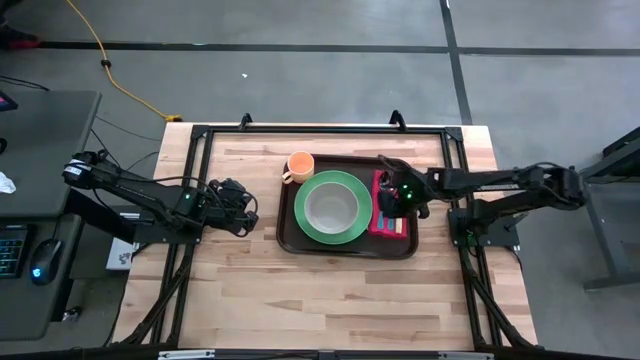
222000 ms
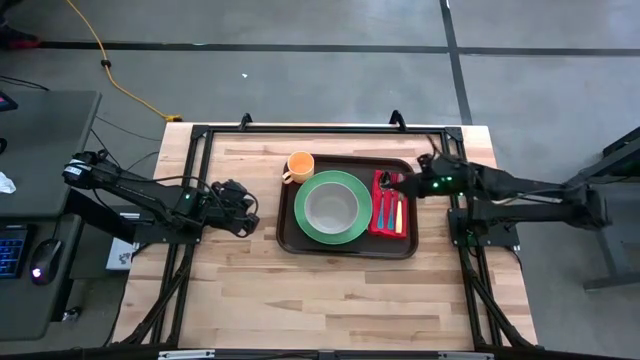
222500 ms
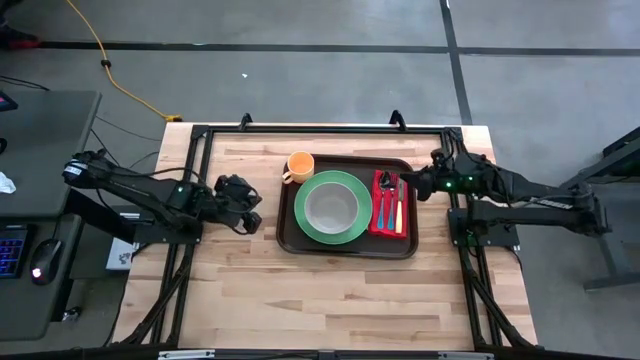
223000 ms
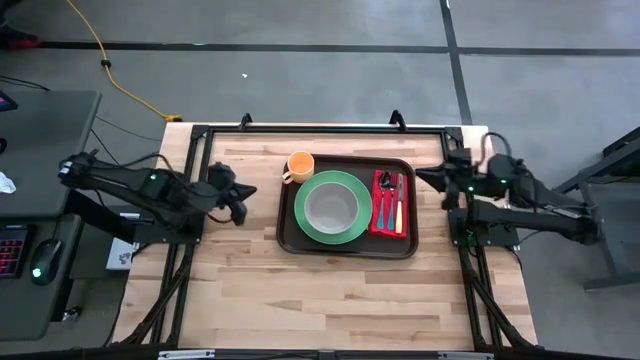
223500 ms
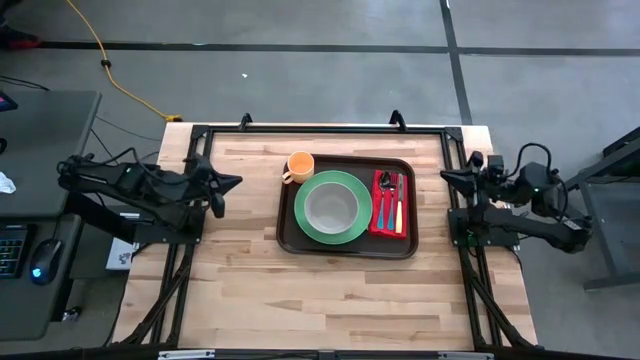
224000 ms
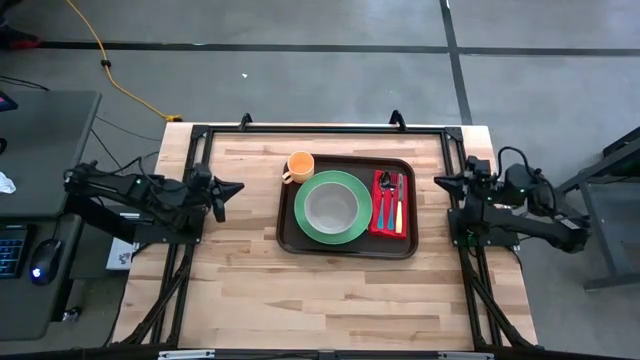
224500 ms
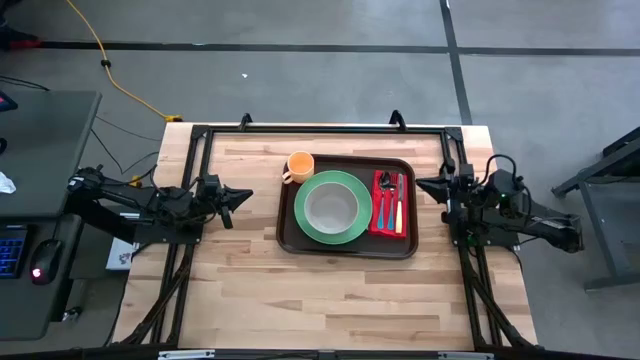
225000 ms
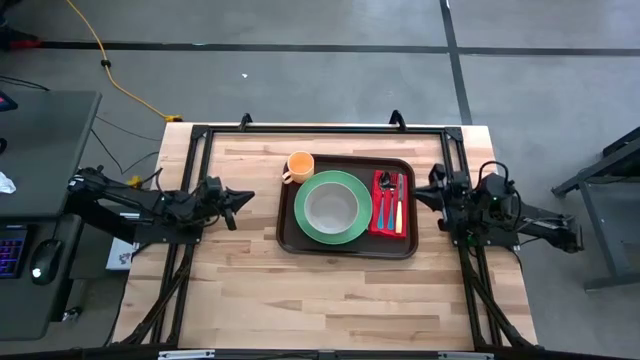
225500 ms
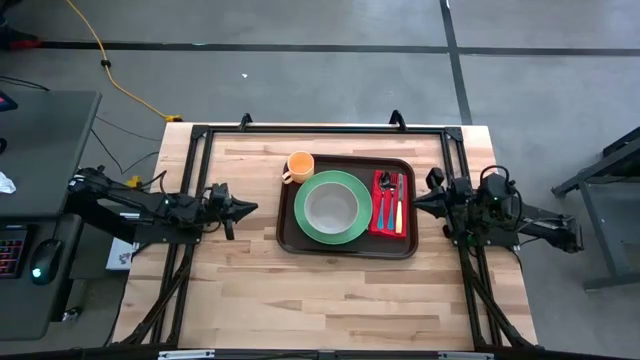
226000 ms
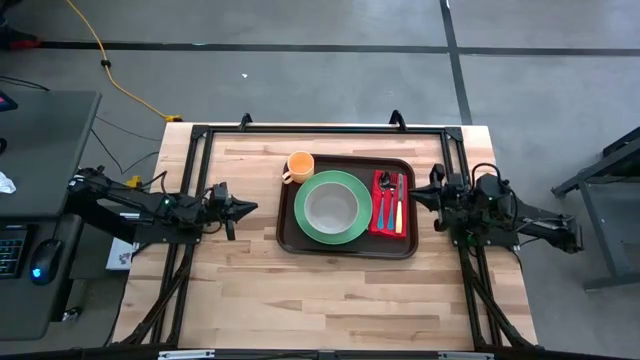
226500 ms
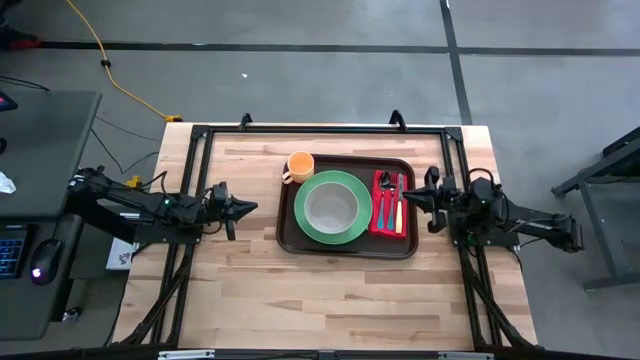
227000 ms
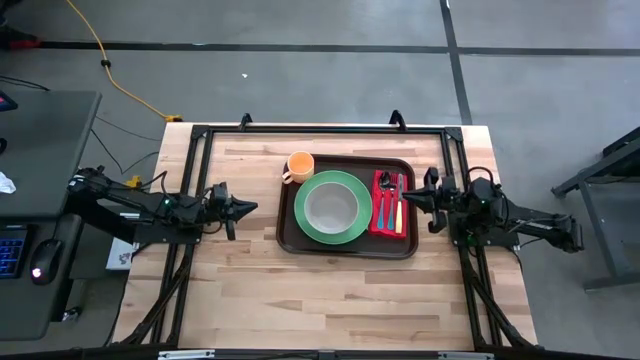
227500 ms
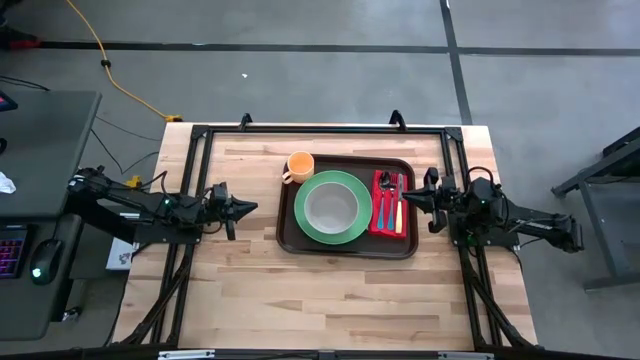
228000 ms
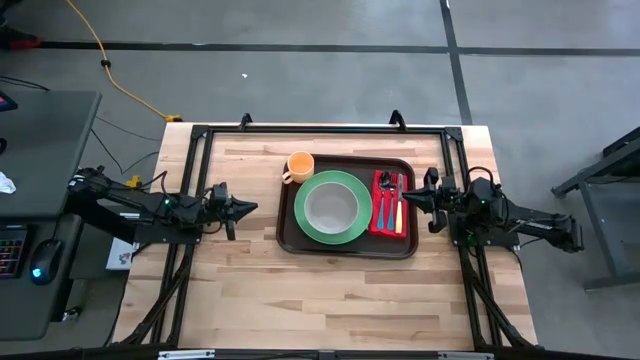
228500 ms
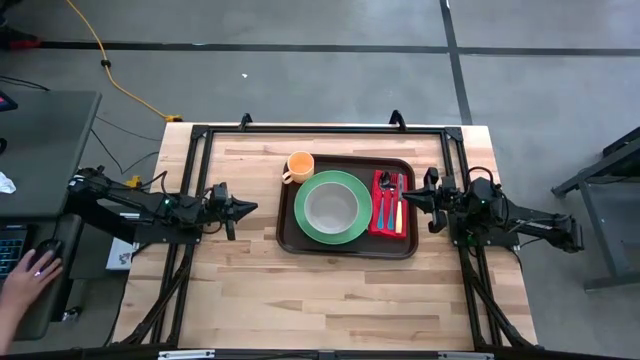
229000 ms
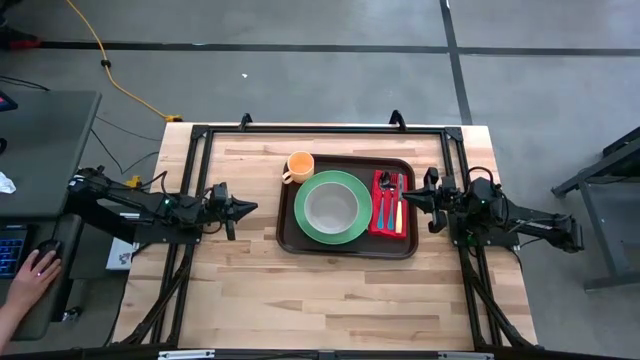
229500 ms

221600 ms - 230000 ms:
Task: Set up tray
Return to Home Position

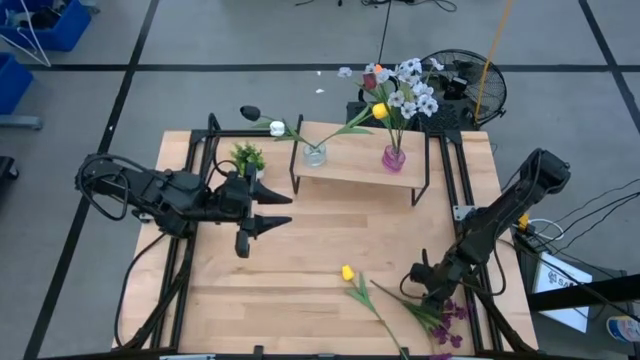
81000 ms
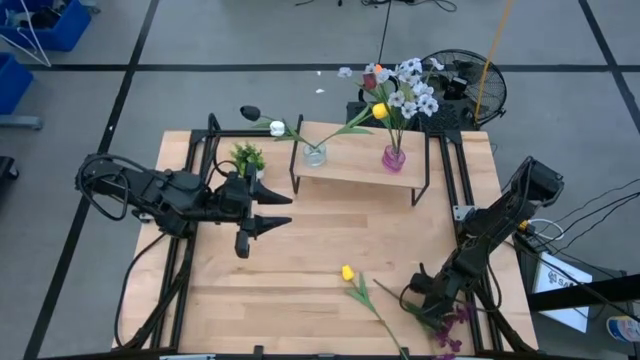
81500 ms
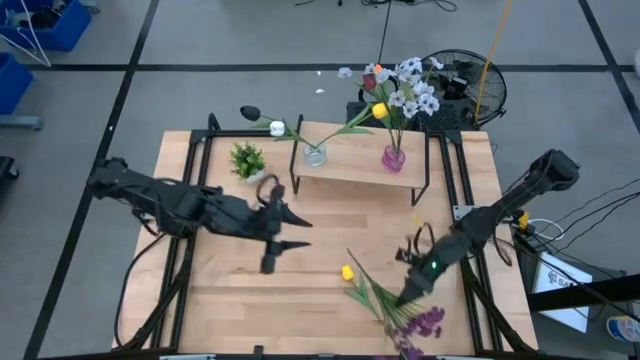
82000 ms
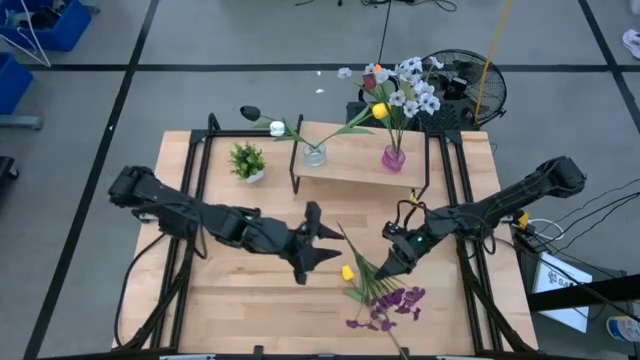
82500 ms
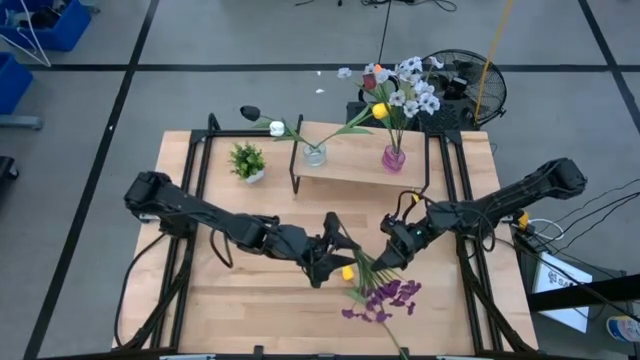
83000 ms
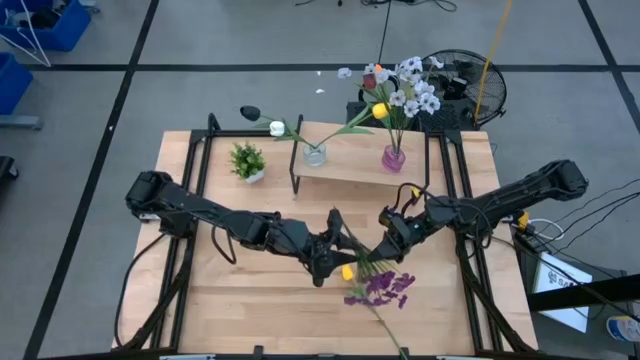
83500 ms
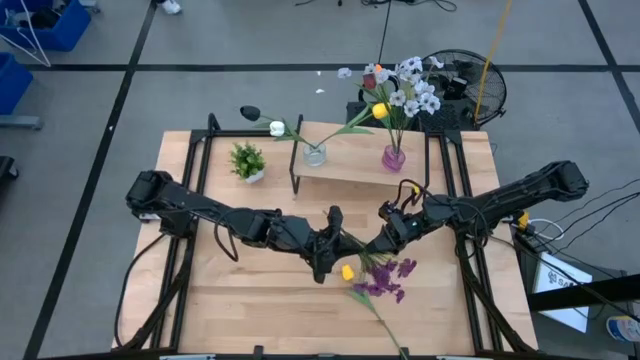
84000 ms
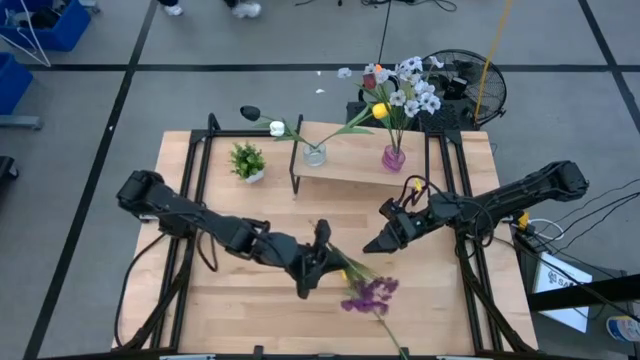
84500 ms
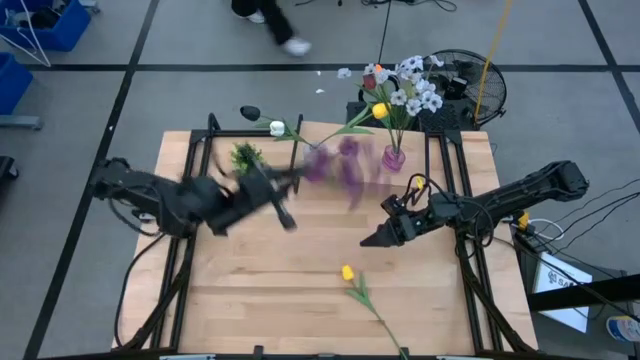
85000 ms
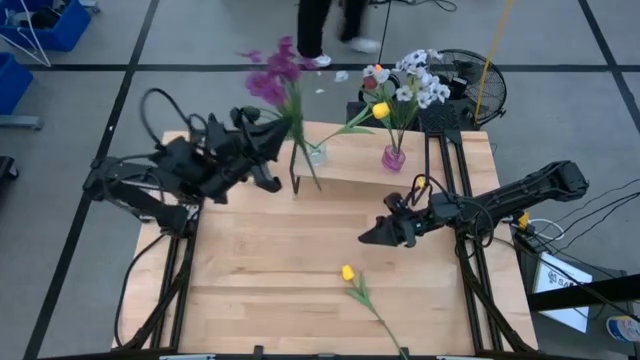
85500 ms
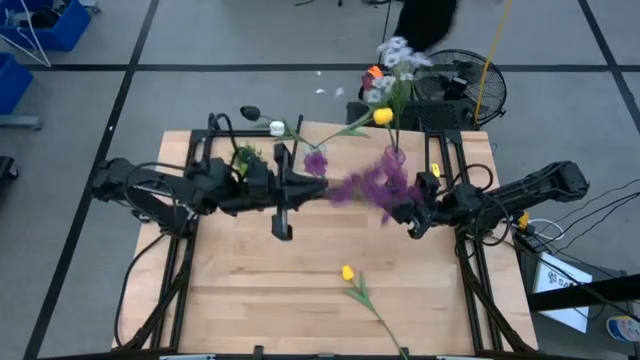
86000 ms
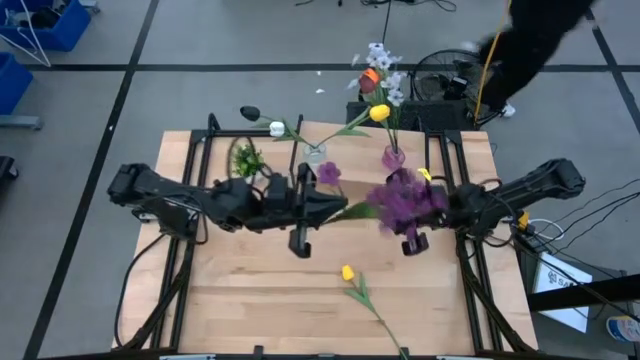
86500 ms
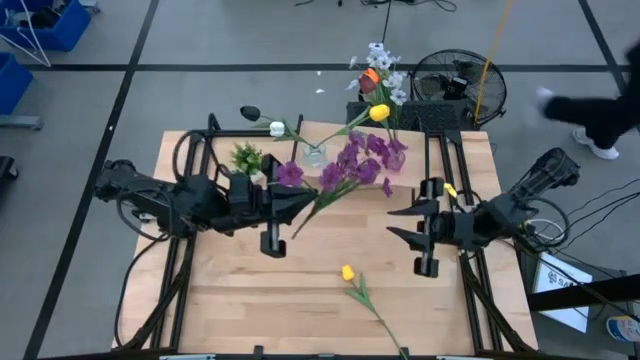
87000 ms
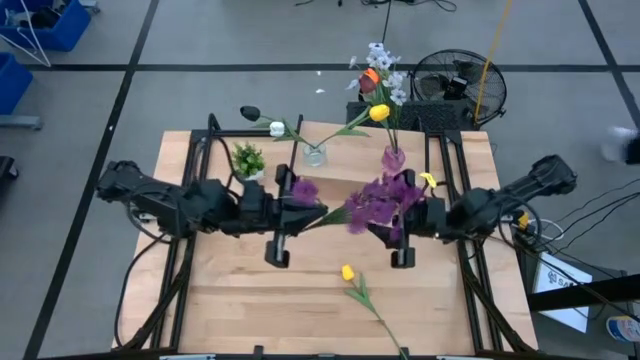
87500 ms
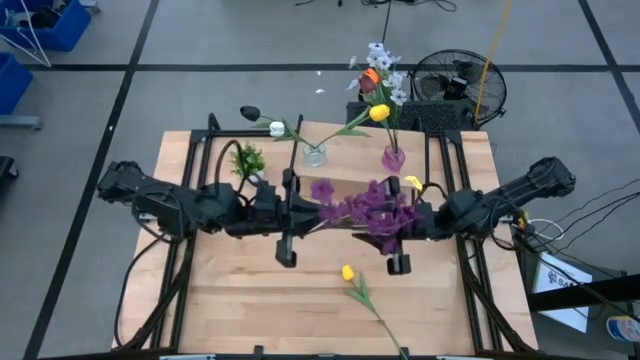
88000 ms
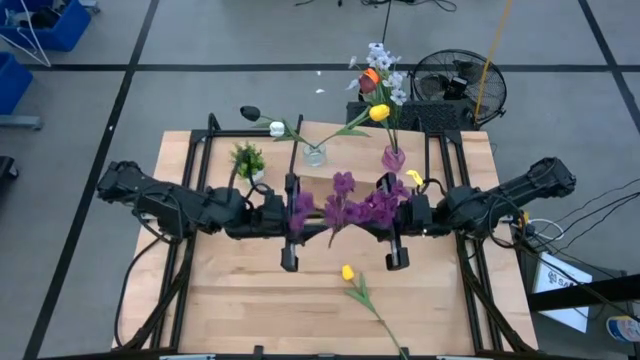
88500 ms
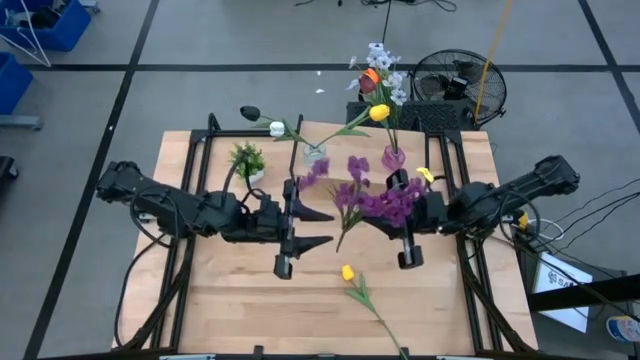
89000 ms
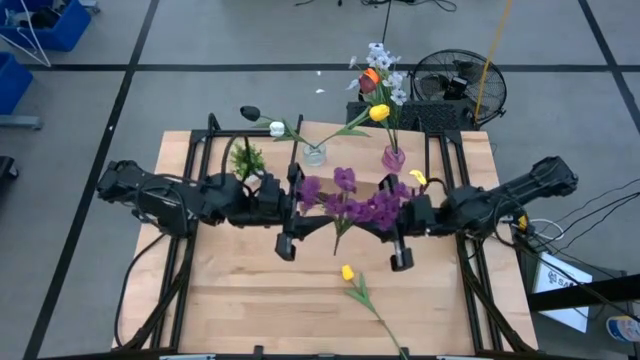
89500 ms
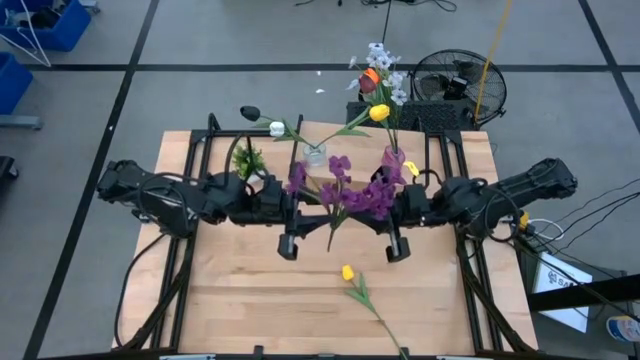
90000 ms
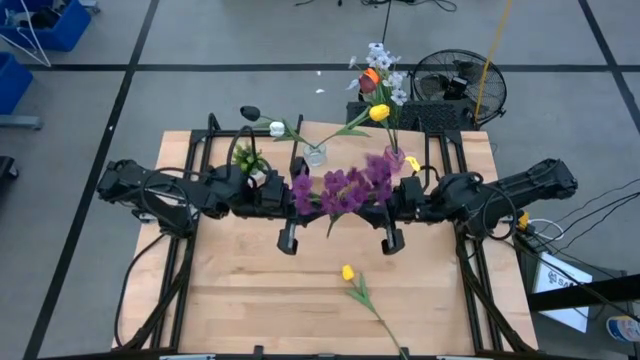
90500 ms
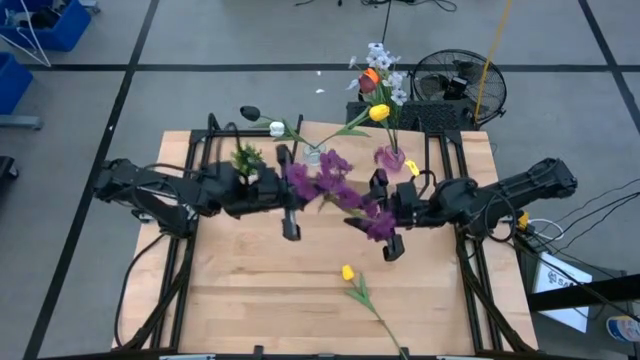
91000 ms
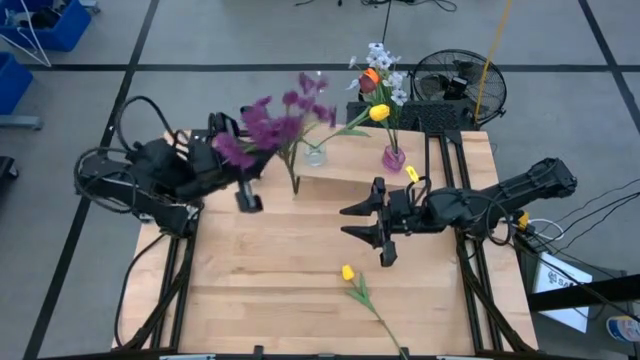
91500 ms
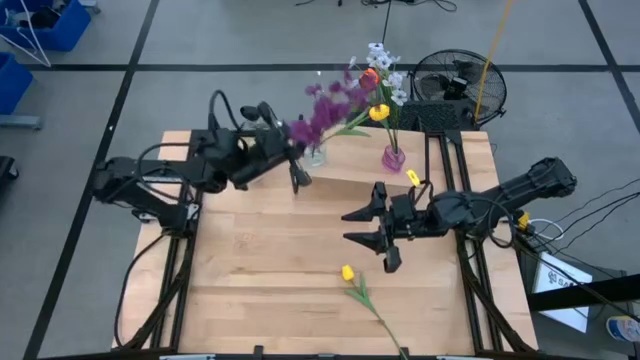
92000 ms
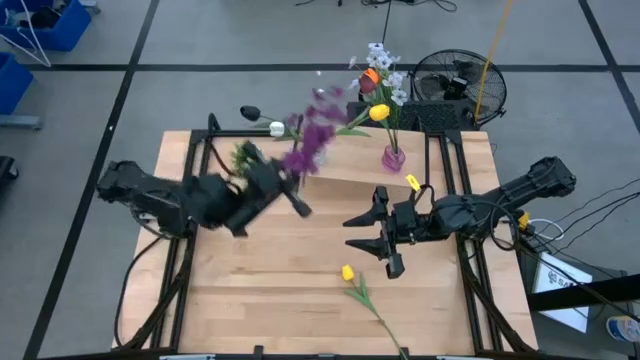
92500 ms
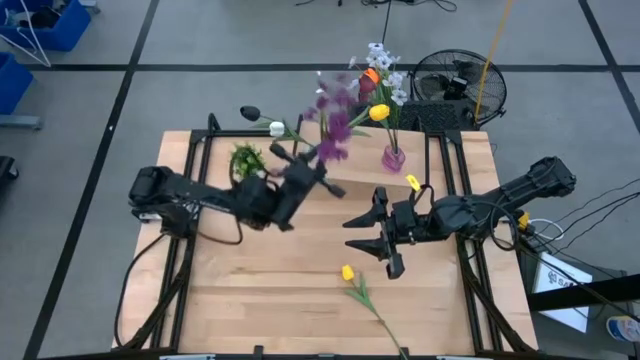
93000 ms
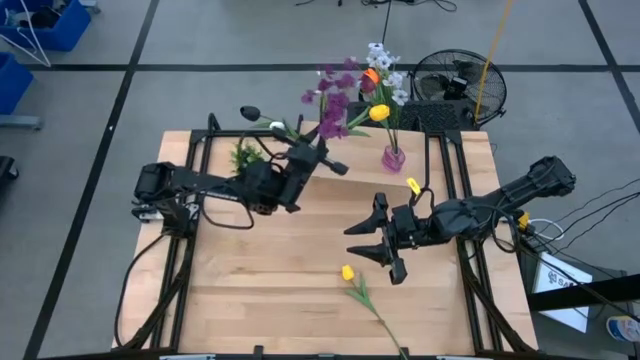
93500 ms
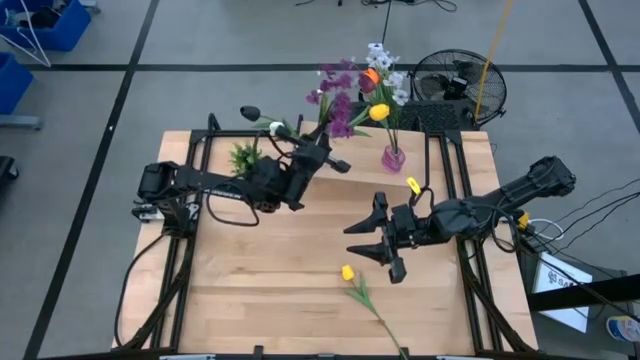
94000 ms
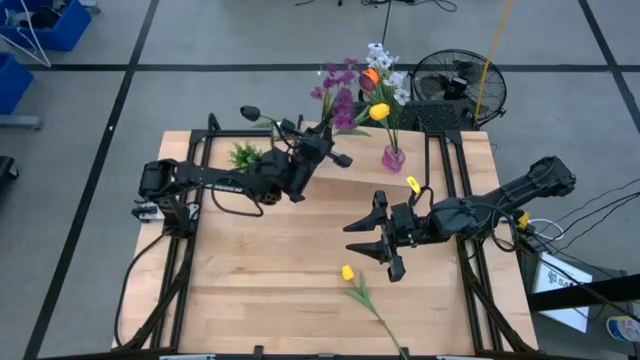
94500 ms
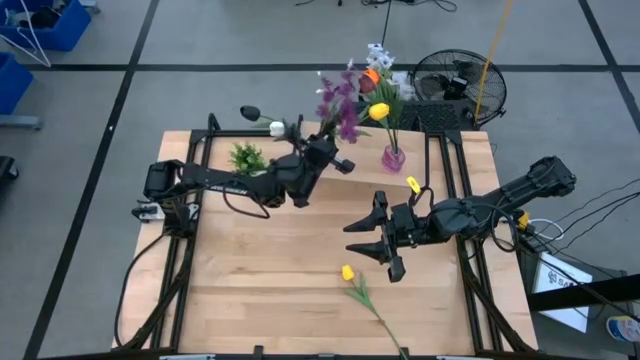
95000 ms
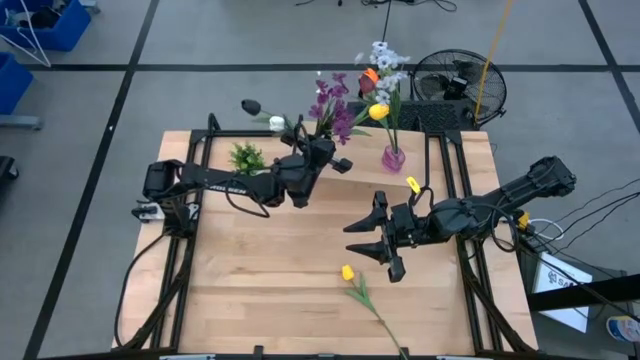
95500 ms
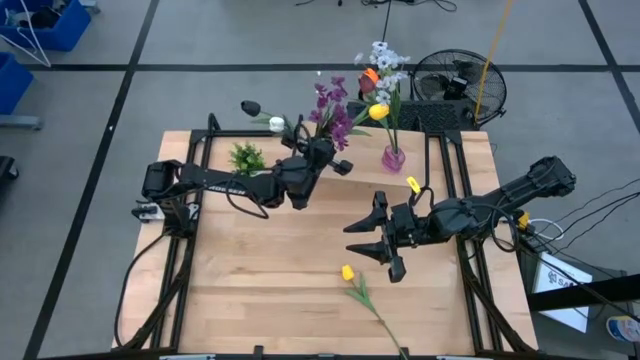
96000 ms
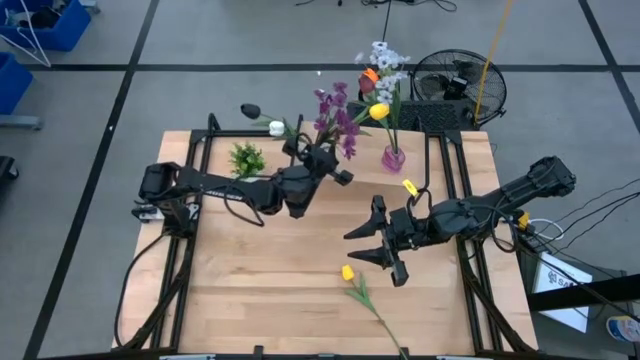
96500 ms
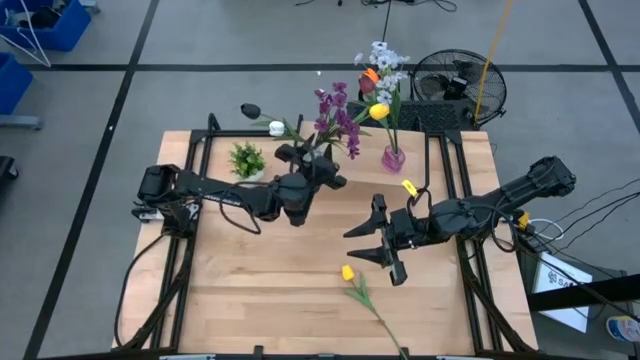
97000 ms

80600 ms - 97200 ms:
Task: Pick and place flowers into a vace then onto a shelf
Put the purple flower into the transparent vase
